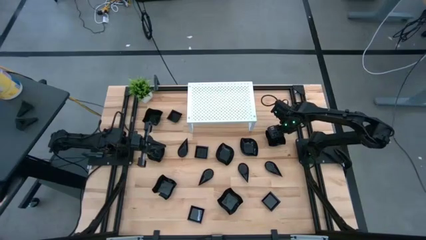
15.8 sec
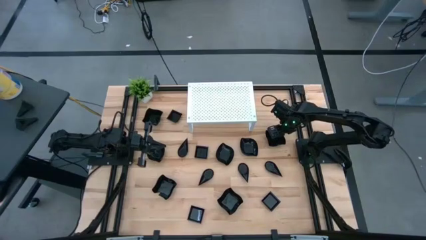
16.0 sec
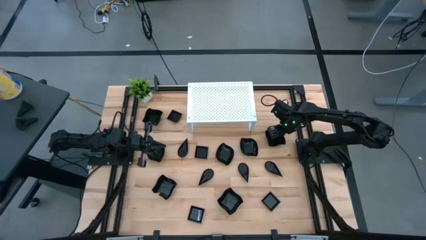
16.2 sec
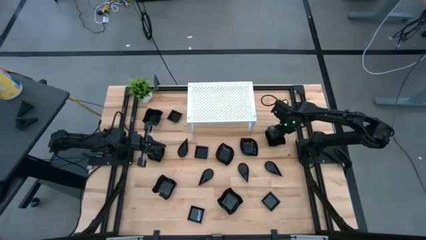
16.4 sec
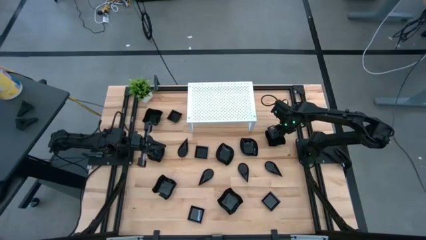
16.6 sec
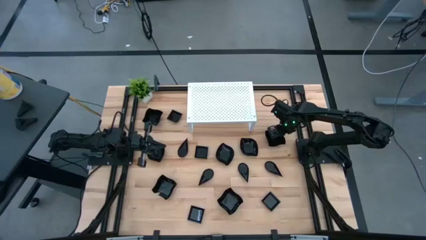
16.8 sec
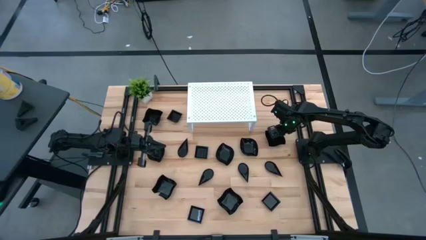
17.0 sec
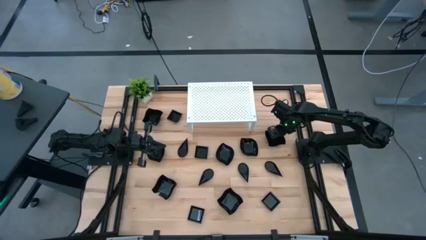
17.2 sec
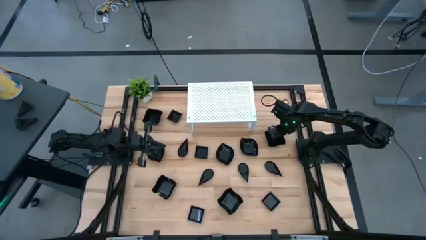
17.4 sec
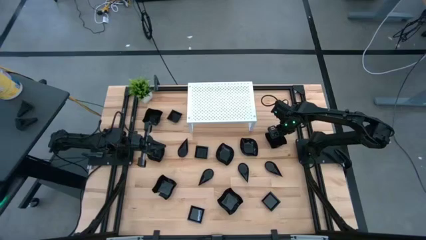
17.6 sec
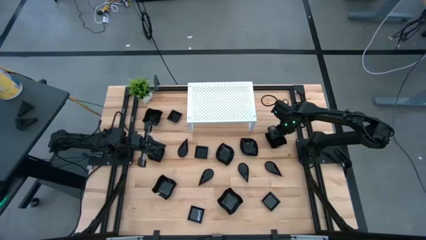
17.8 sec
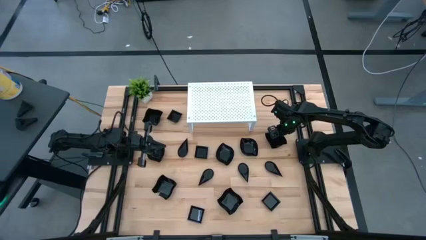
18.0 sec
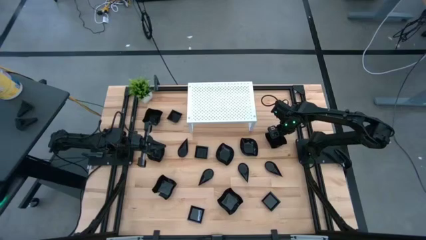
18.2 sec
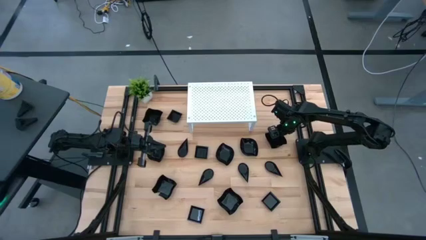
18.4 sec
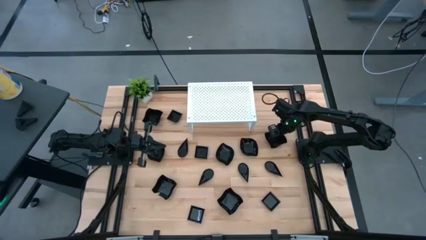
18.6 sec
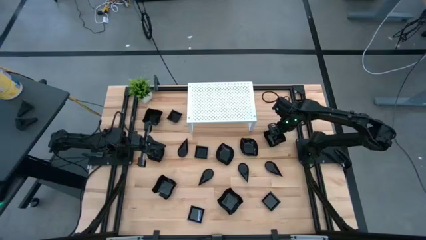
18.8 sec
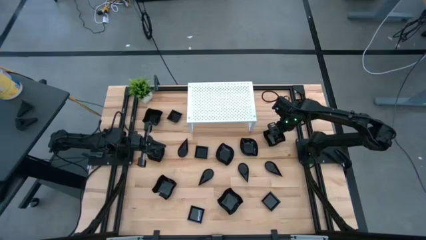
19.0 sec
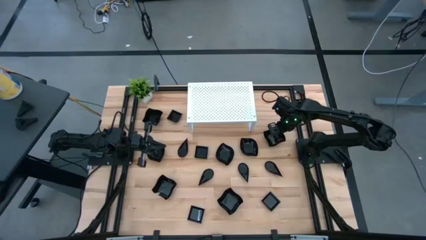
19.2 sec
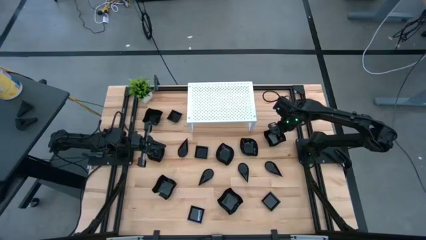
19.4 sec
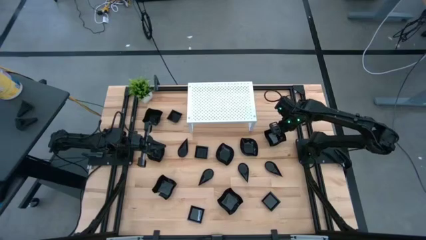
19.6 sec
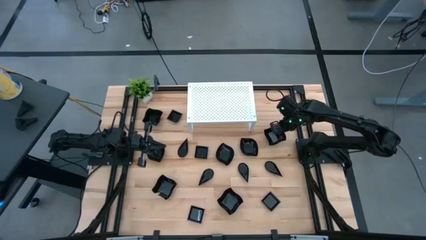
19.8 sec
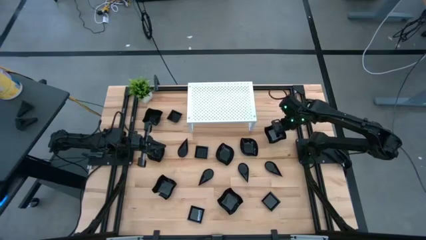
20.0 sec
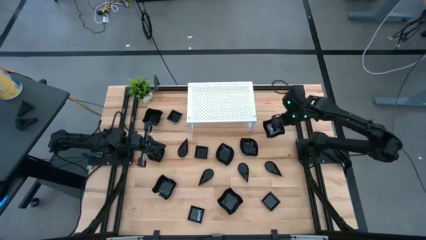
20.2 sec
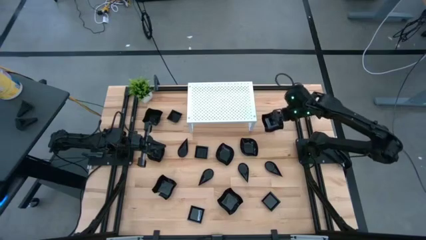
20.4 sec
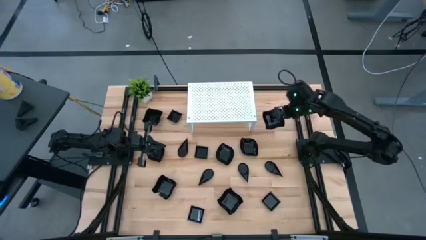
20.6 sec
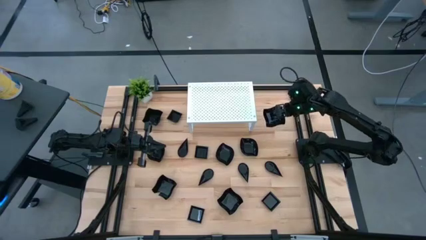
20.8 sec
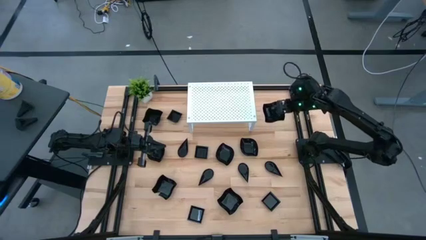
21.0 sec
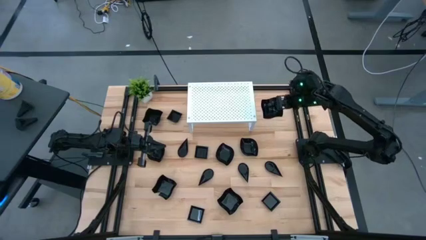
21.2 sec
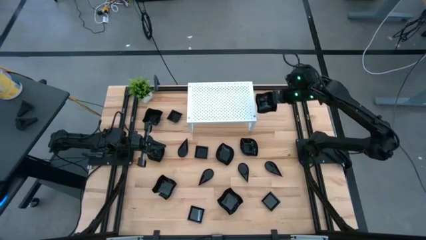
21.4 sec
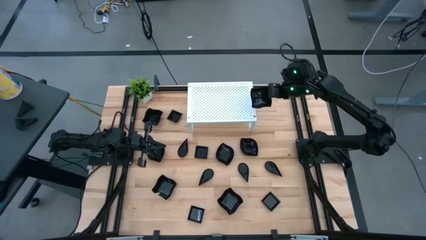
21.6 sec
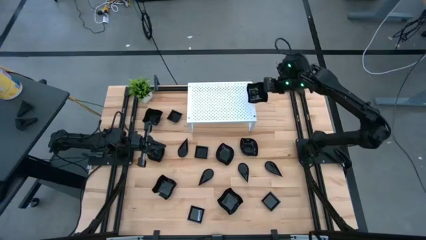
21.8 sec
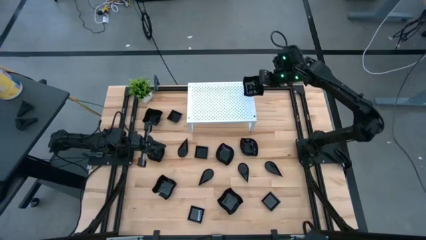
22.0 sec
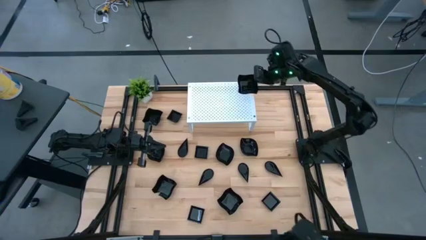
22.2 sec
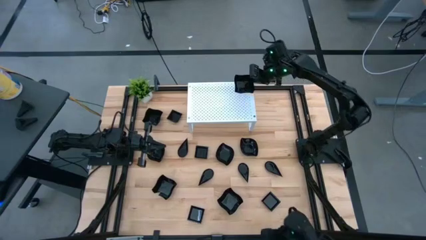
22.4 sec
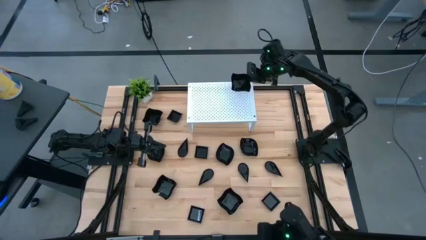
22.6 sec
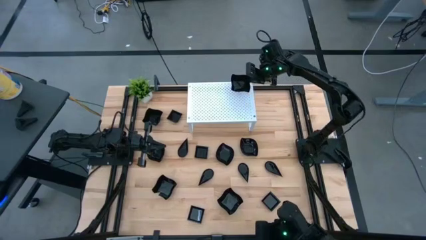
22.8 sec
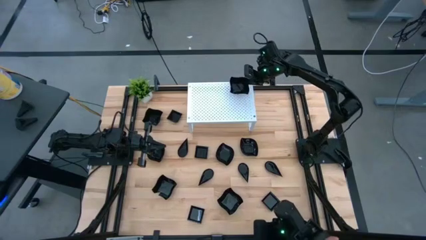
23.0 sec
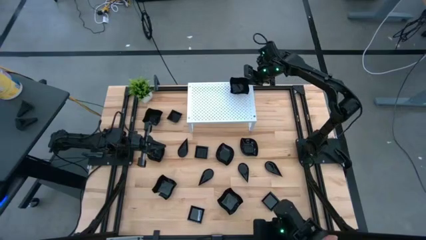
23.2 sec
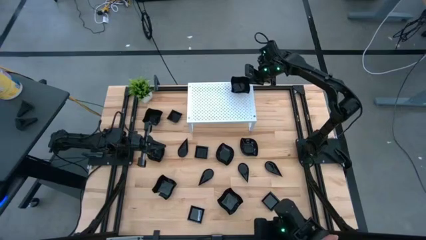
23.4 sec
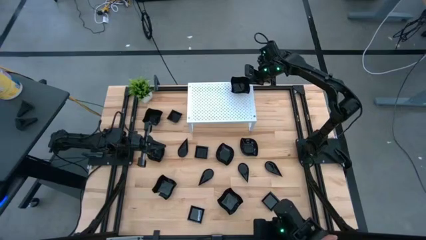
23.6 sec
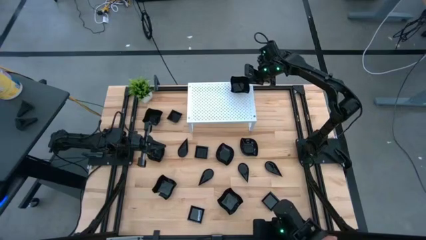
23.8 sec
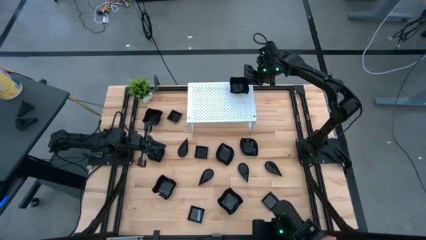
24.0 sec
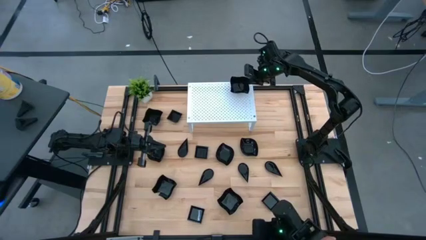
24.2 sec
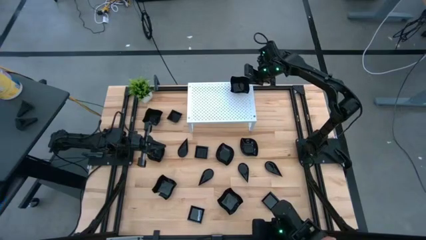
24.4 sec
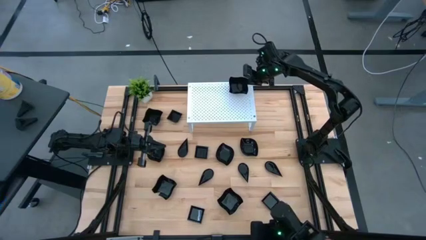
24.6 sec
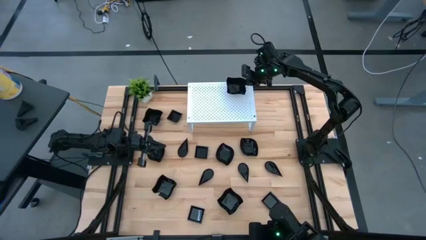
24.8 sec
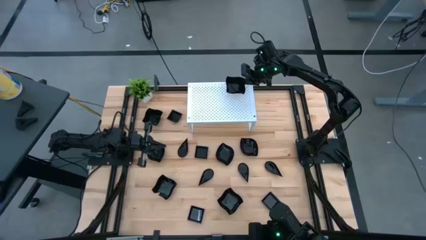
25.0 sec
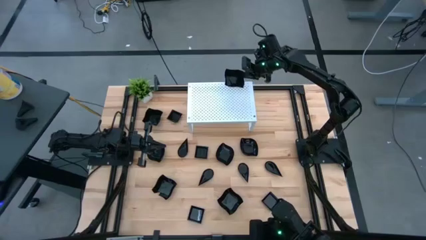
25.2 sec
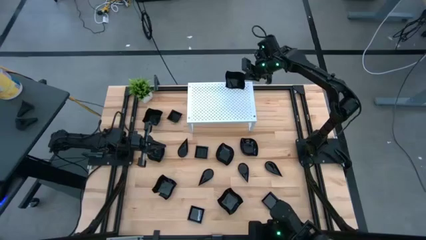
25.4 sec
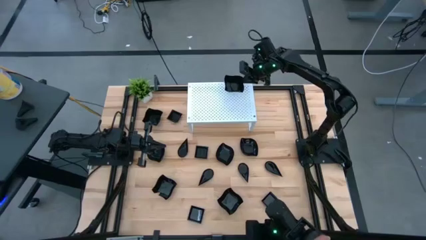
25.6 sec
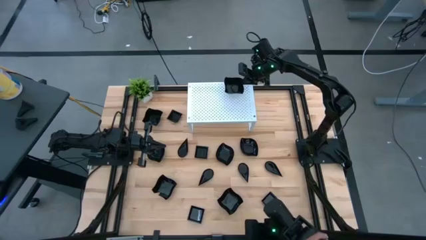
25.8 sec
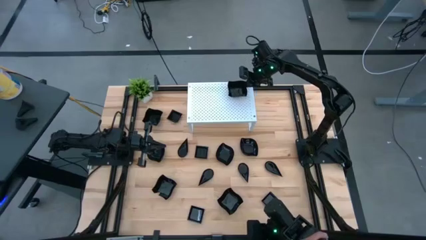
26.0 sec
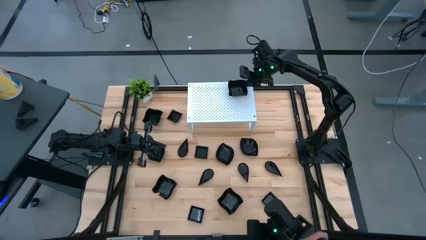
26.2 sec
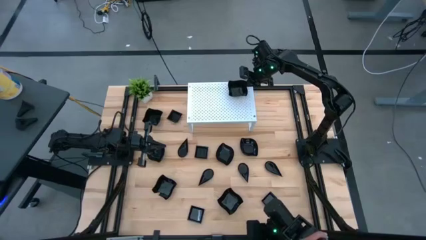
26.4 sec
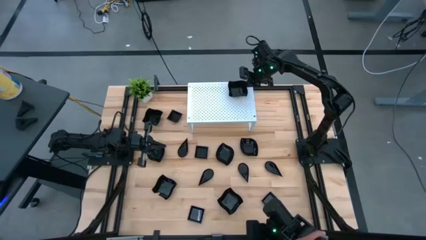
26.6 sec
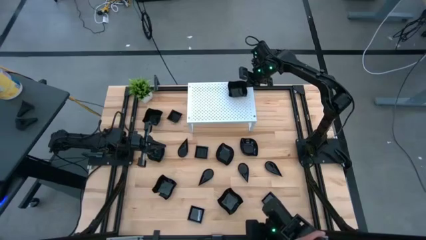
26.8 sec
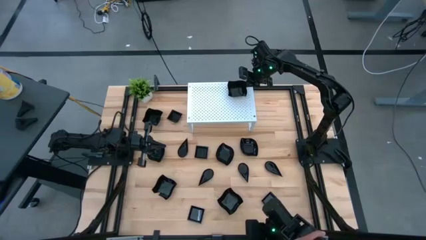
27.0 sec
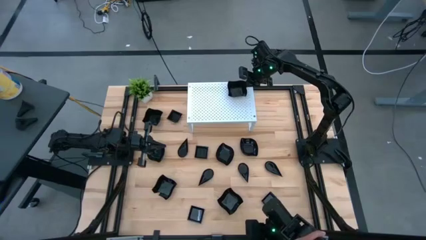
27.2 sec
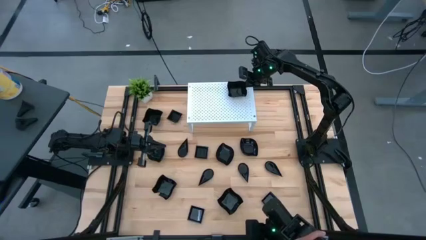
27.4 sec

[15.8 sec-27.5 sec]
Task: Pick & Place Mini shaped plates
Put the distorted square plate on the shelf
